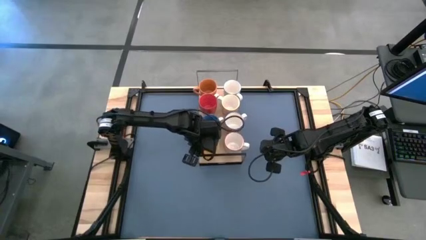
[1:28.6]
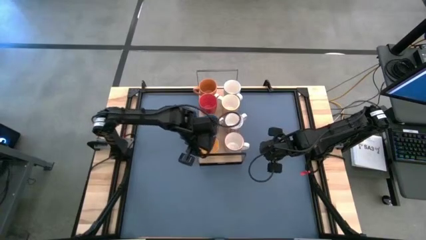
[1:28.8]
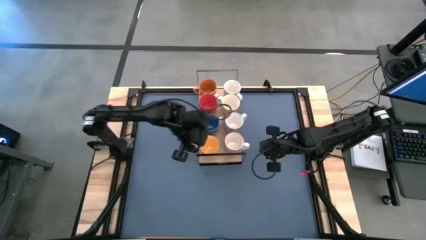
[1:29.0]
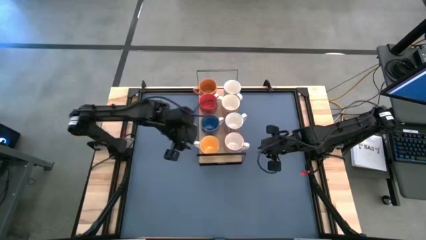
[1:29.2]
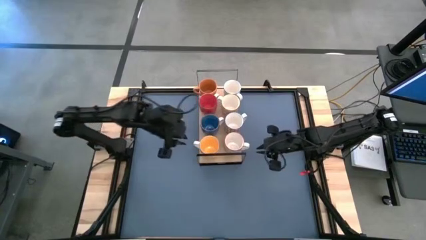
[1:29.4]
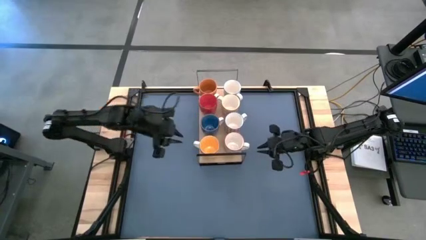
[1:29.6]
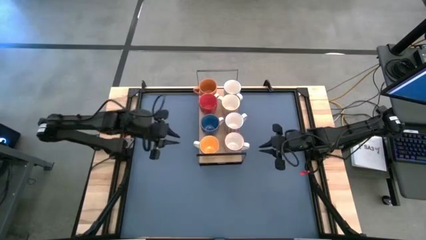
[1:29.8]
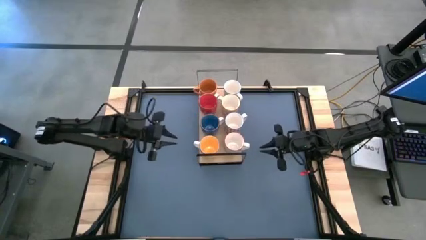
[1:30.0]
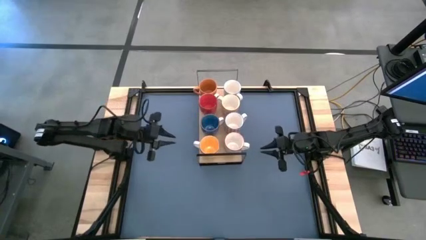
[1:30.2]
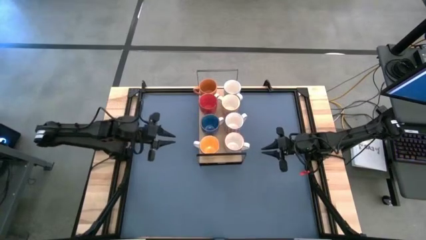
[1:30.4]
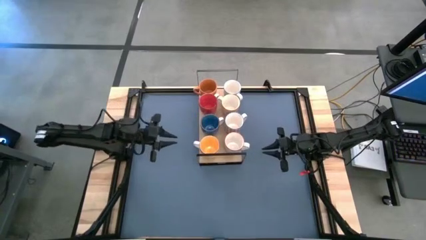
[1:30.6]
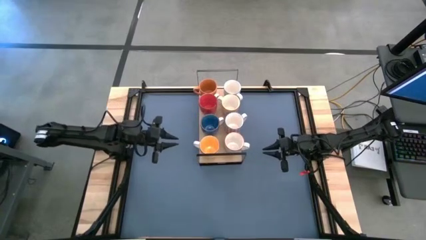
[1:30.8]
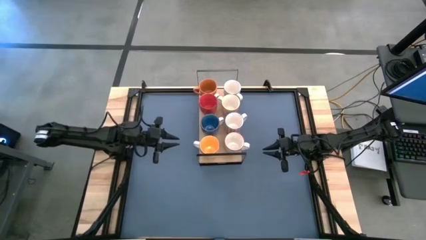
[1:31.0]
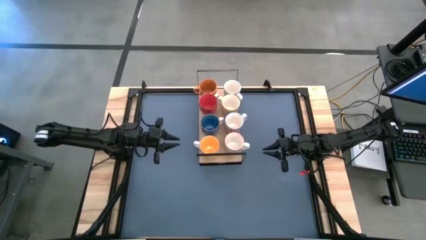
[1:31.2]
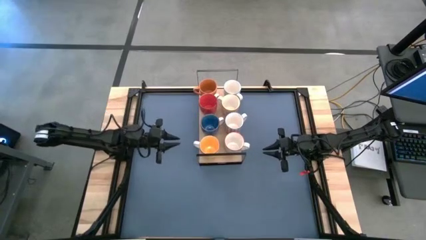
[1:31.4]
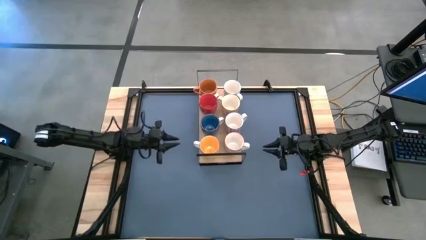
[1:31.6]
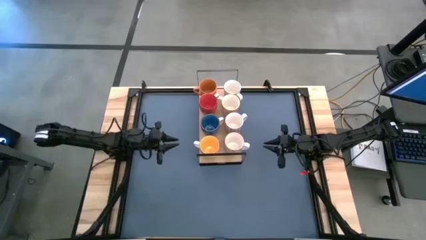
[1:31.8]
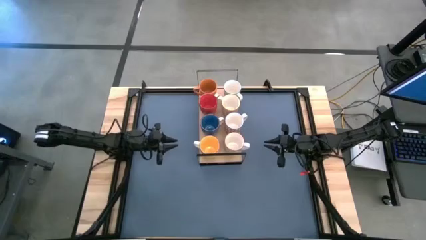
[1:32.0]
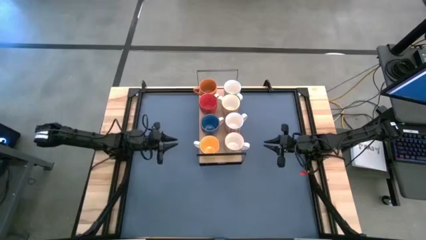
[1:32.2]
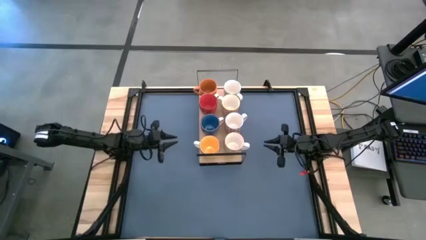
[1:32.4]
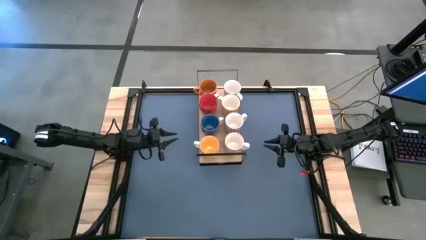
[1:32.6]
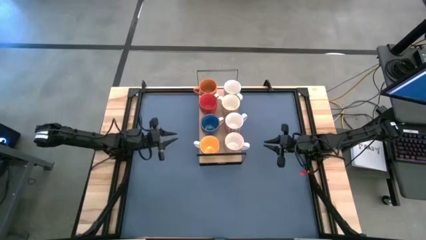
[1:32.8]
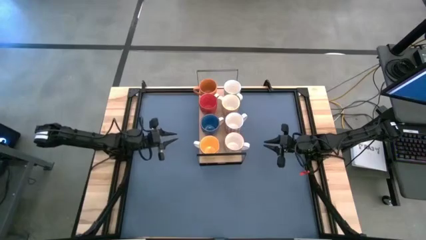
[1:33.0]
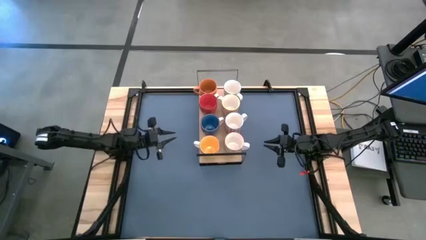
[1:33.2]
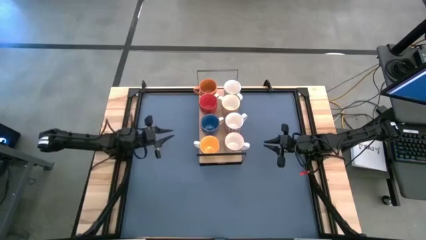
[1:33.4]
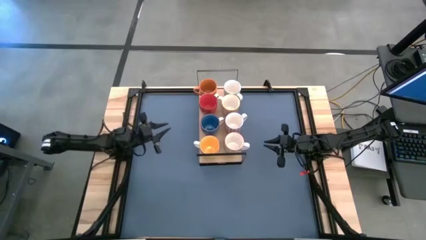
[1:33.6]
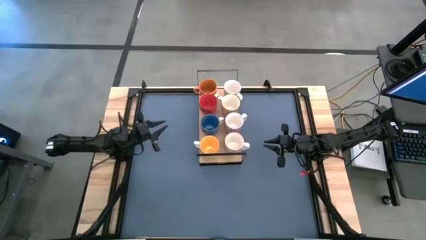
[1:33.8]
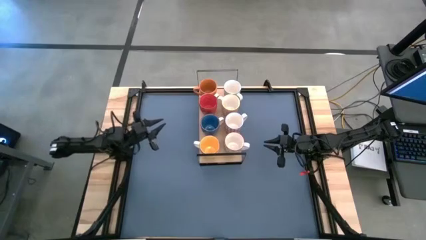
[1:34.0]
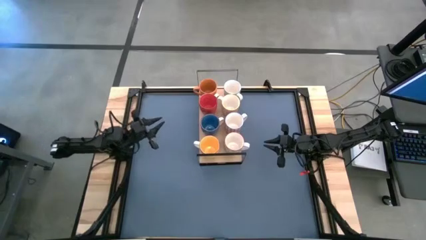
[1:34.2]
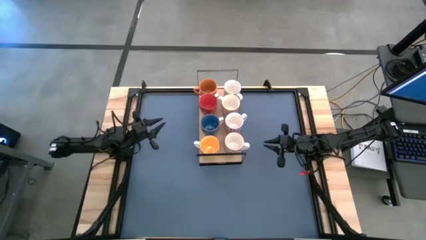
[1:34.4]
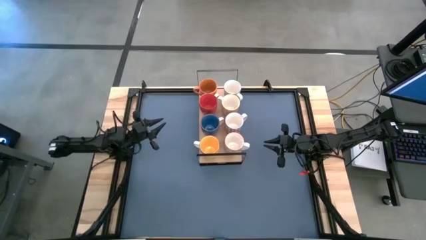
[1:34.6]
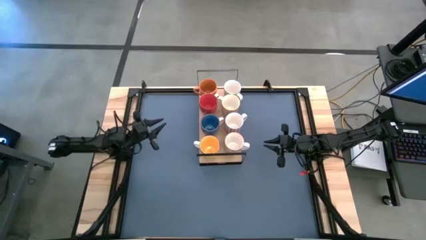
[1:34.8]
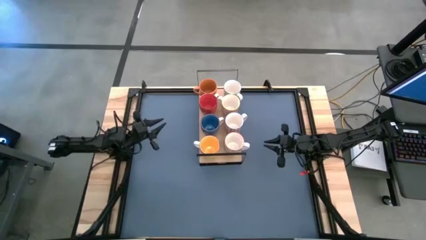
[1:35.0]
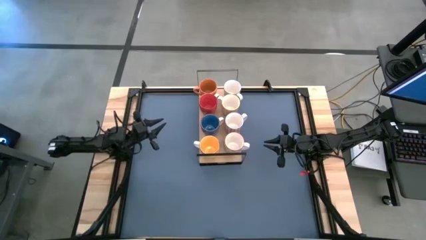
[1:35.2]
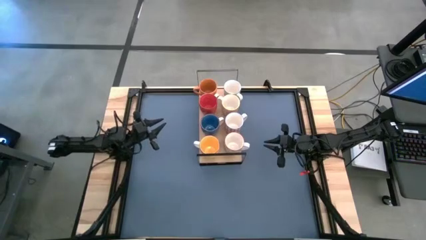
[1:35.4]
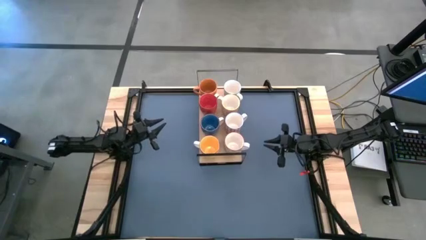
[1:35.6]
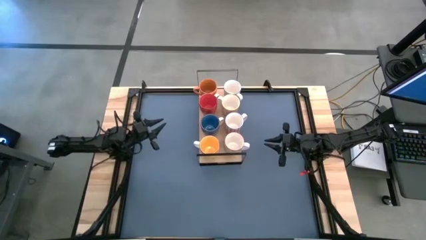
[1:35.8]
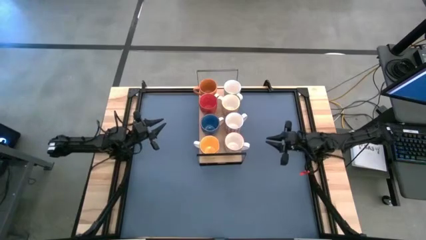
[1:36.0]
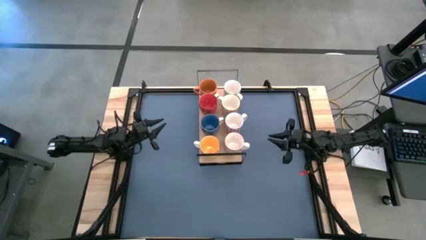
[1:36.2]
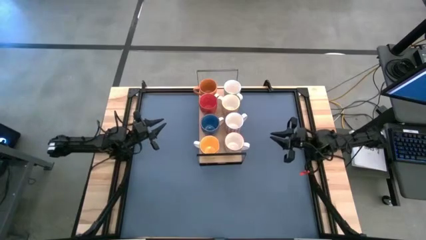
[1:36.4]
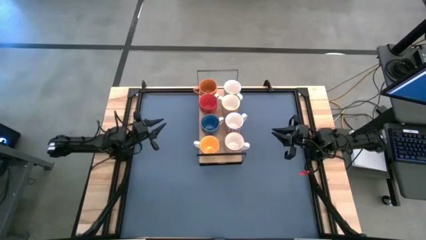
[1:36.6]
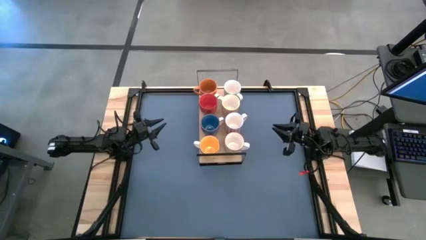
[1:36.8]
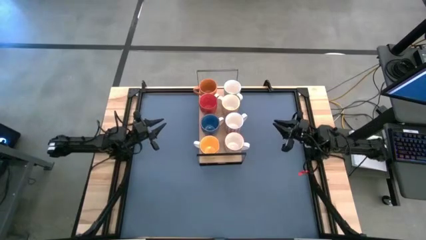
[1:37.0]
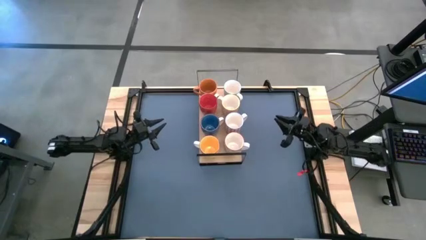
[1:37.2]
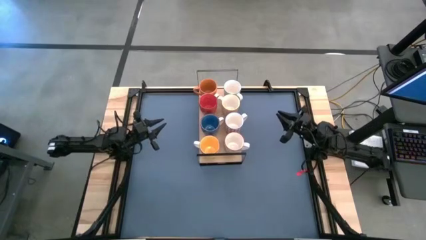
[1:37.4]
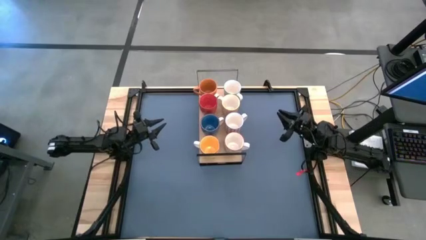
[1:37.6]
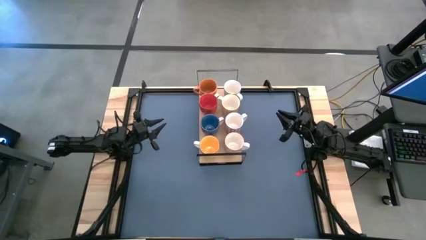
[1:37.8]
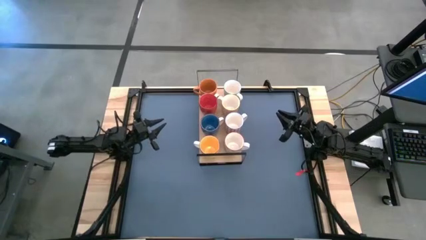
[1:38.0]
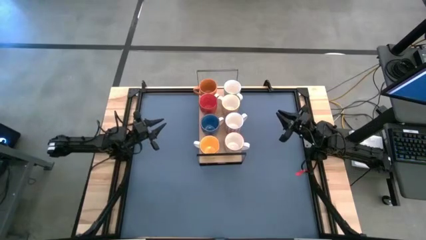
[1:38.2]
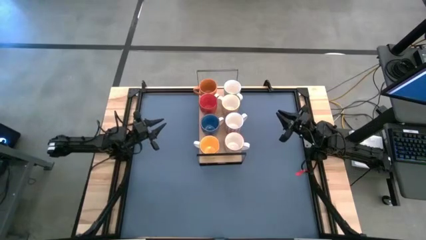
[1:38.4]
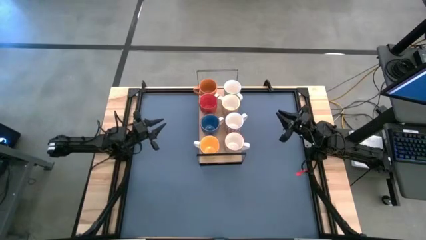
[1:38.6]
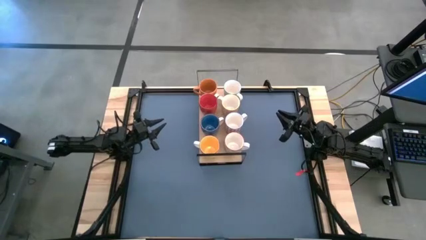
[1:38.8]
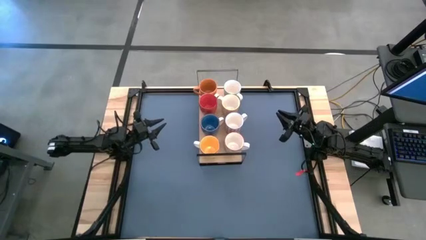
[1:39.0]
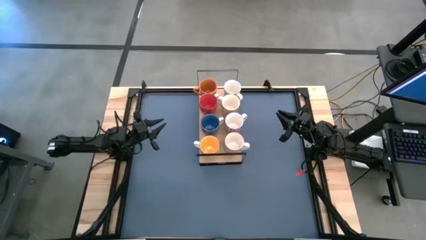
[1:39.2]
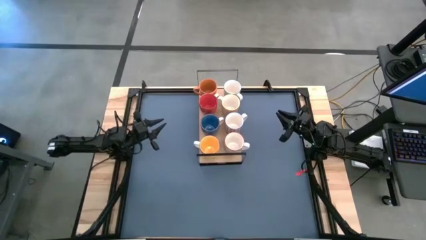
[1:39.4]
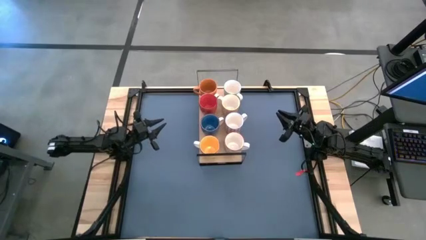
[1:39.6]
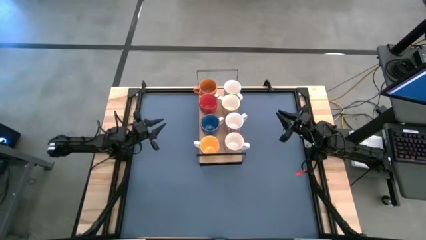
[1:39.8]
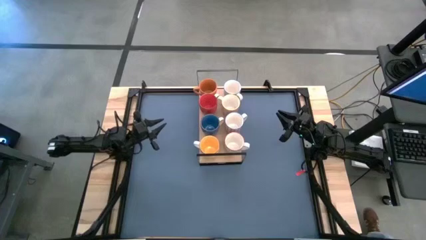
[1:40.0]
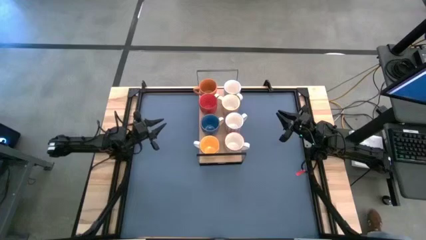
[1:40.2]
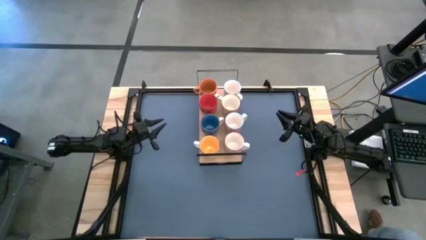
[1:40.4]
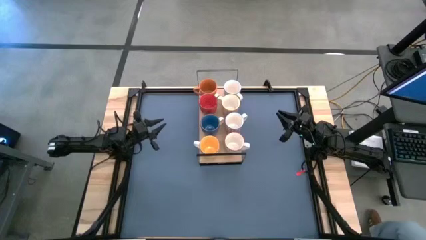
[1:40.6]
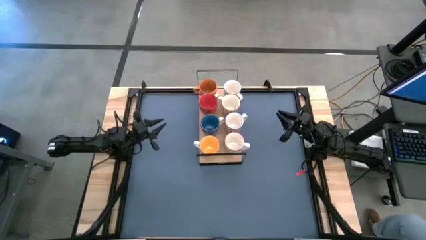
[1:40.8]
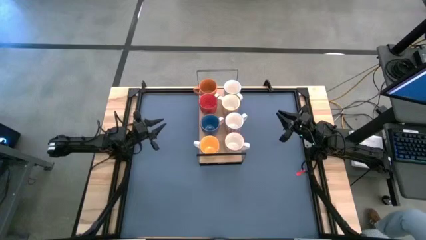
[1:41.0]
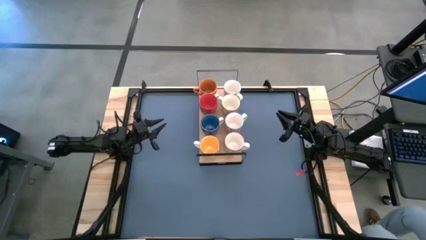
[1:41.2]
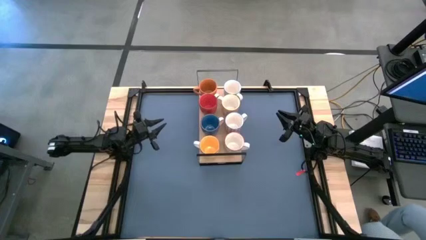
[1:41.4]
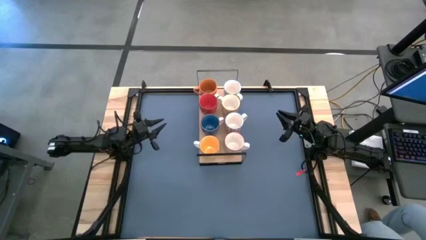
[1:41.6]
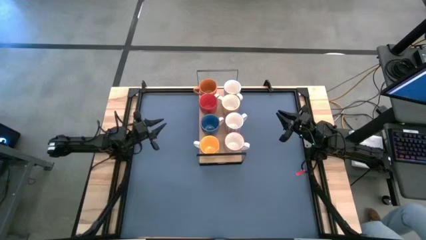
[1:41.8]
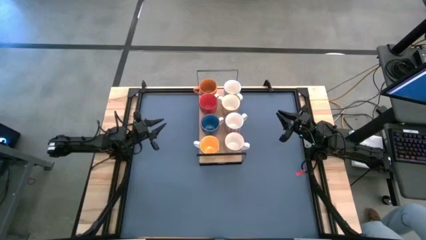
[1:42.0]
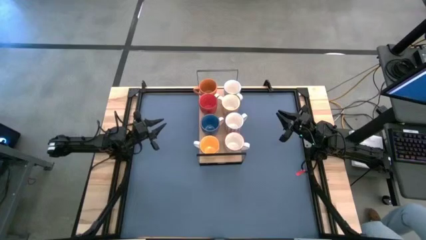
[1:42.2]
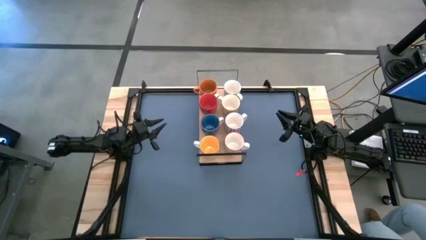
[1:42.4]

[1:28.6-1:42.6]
Task: Place coffee mugs
Return to Home Position
